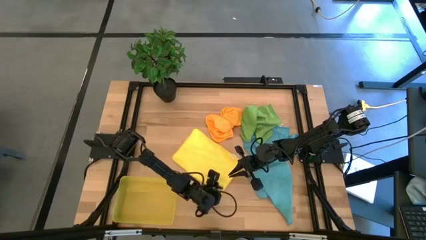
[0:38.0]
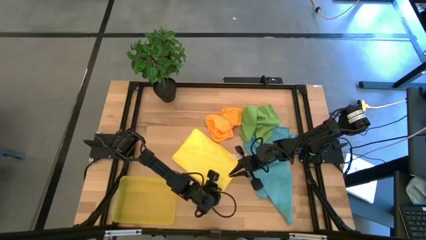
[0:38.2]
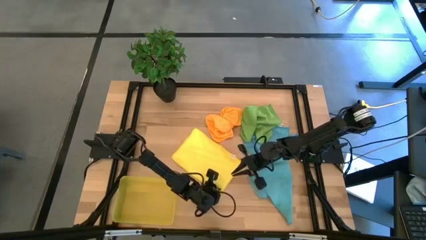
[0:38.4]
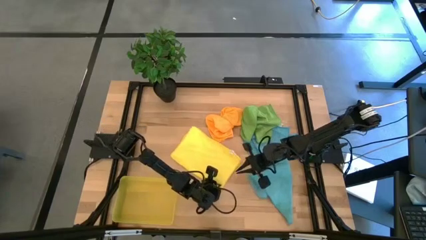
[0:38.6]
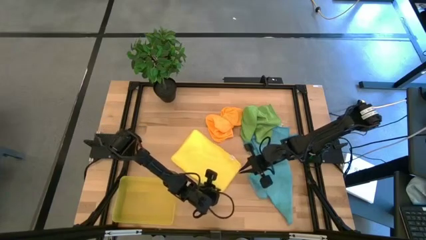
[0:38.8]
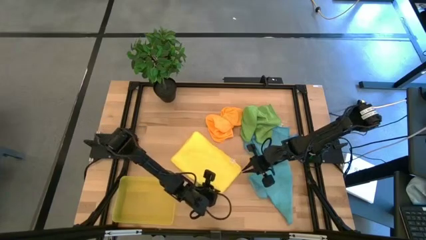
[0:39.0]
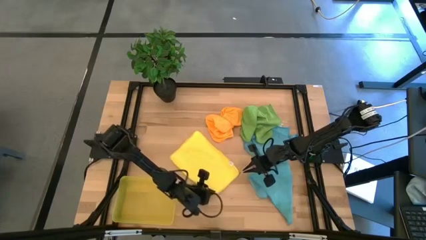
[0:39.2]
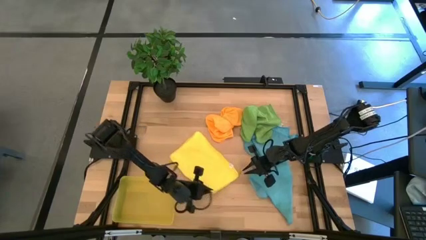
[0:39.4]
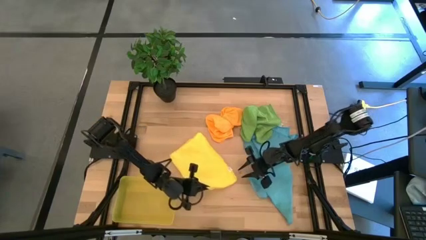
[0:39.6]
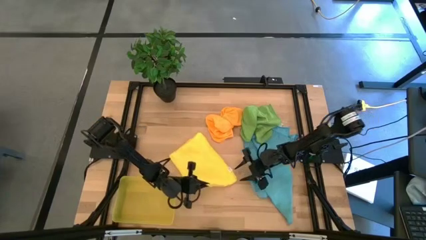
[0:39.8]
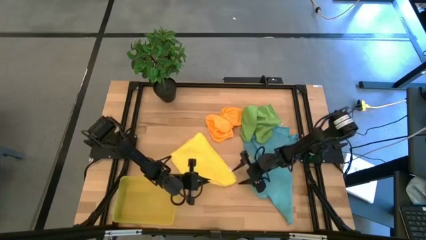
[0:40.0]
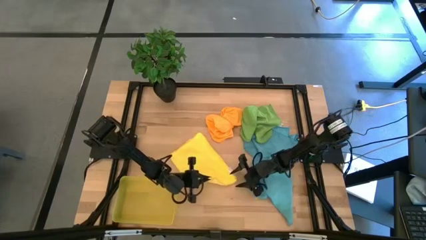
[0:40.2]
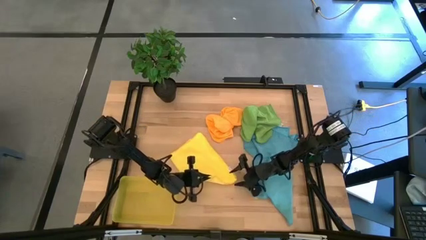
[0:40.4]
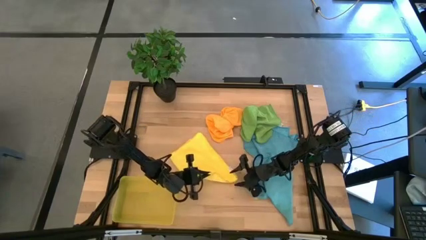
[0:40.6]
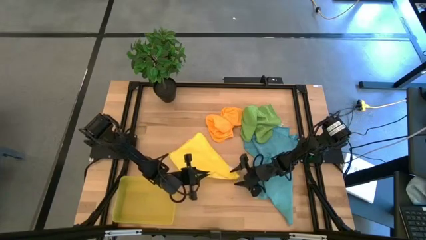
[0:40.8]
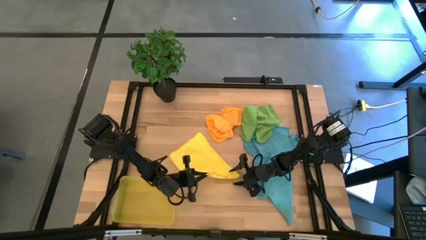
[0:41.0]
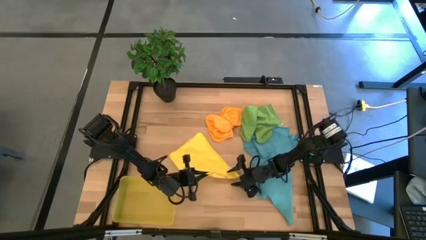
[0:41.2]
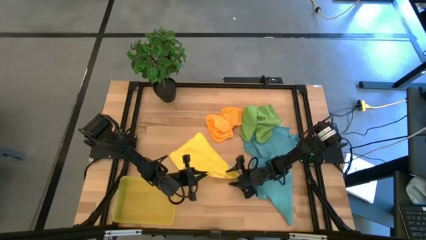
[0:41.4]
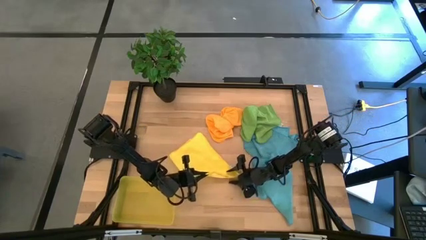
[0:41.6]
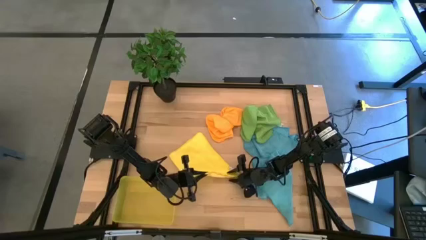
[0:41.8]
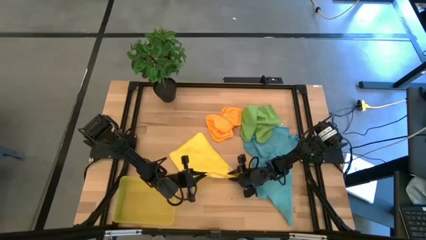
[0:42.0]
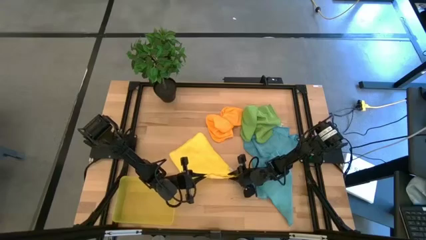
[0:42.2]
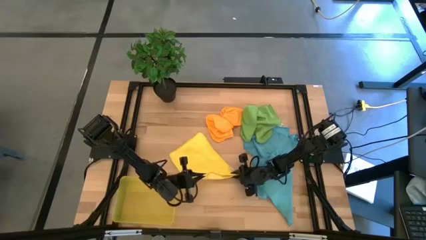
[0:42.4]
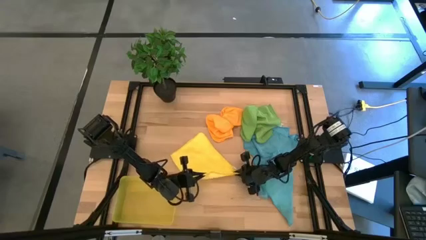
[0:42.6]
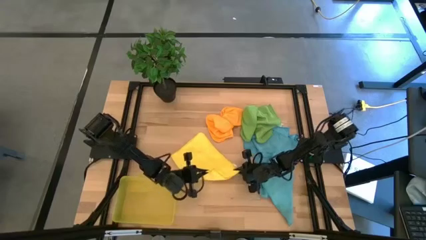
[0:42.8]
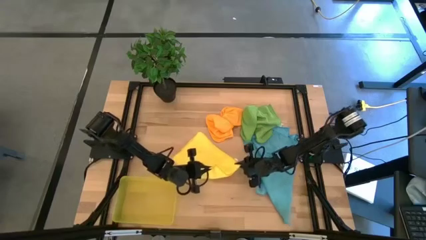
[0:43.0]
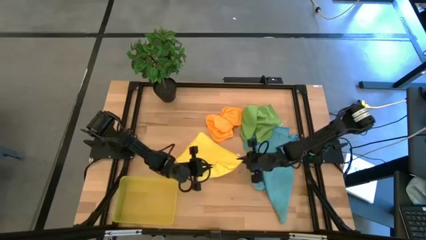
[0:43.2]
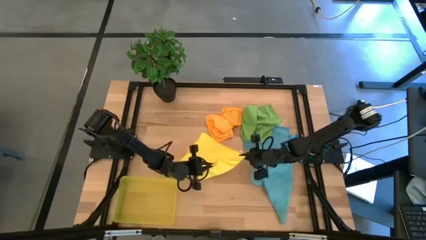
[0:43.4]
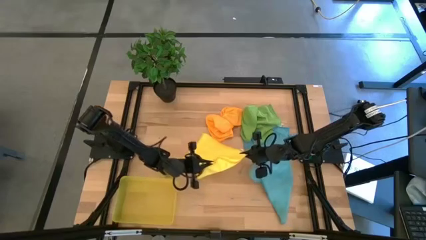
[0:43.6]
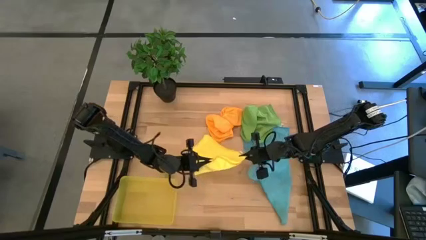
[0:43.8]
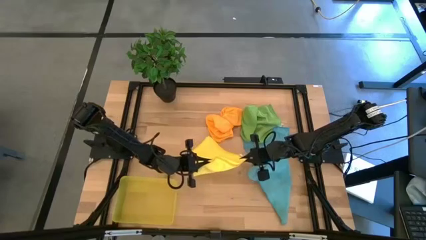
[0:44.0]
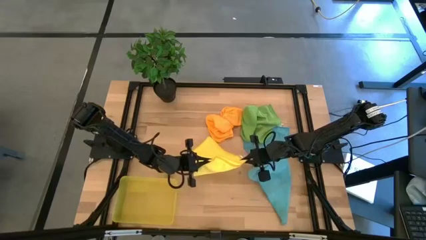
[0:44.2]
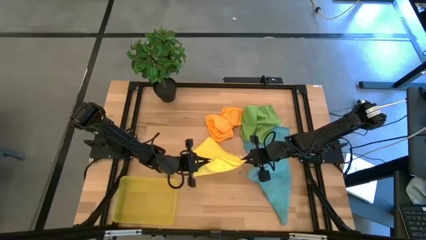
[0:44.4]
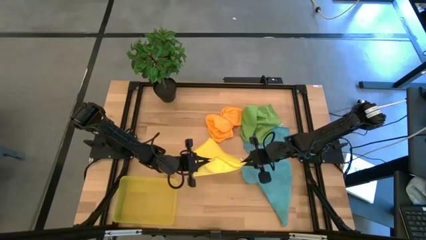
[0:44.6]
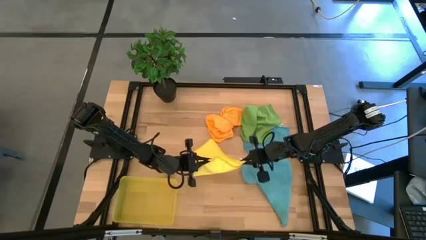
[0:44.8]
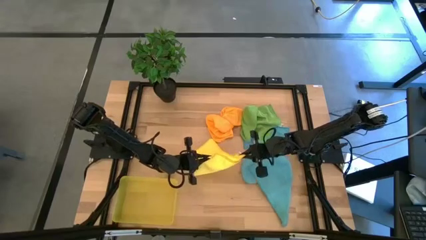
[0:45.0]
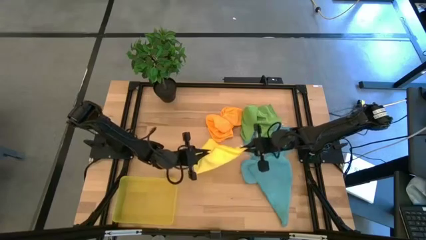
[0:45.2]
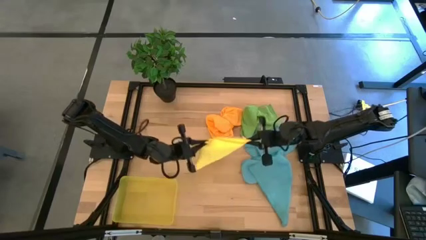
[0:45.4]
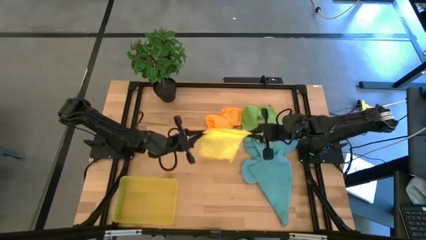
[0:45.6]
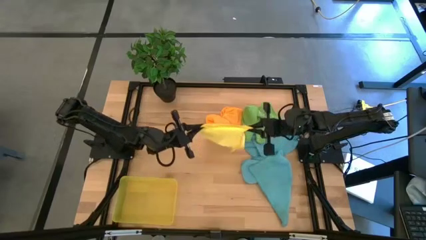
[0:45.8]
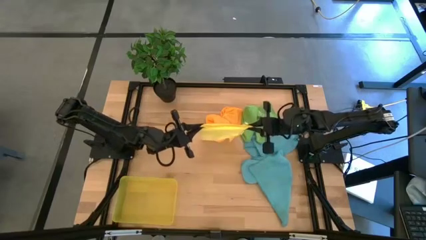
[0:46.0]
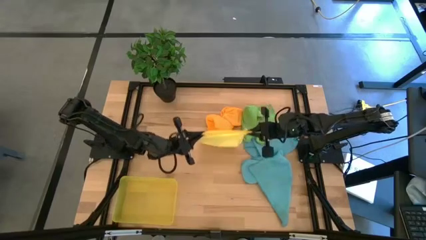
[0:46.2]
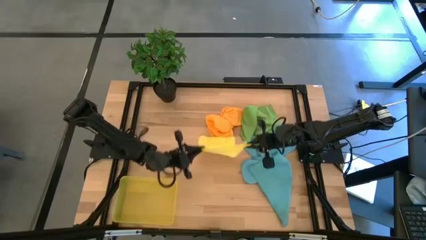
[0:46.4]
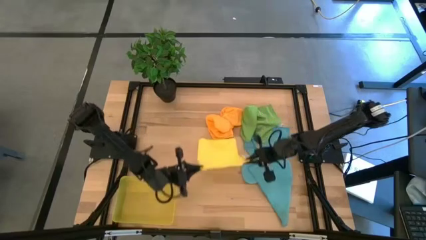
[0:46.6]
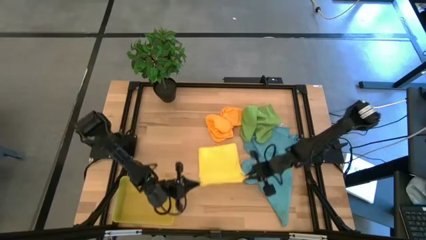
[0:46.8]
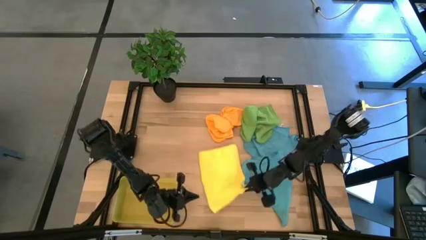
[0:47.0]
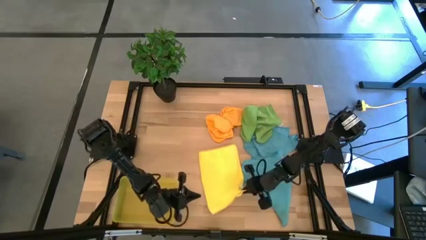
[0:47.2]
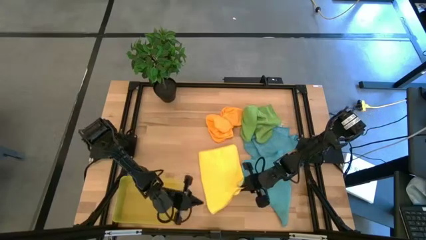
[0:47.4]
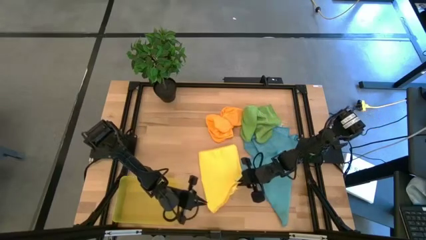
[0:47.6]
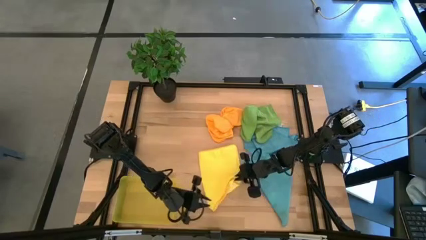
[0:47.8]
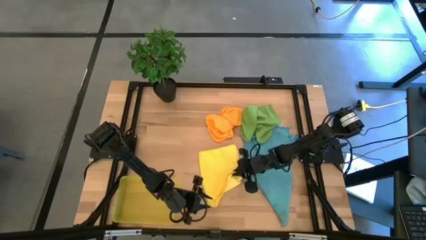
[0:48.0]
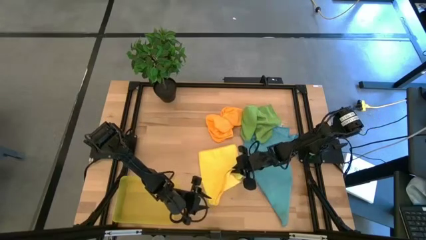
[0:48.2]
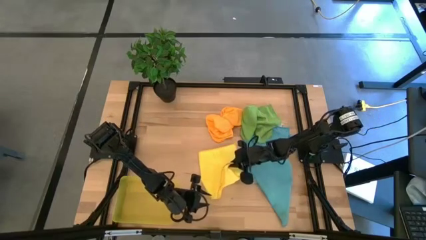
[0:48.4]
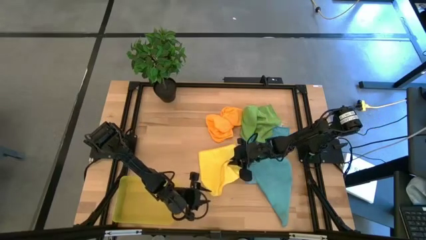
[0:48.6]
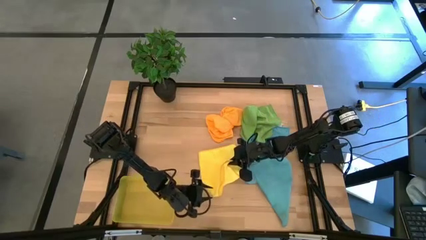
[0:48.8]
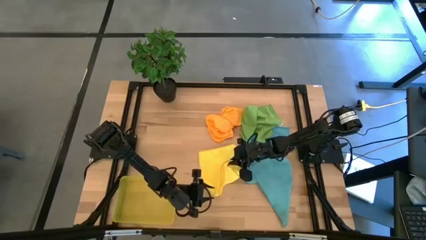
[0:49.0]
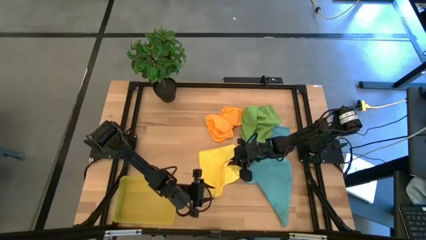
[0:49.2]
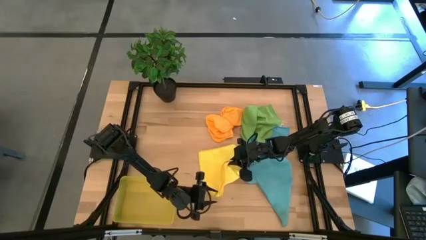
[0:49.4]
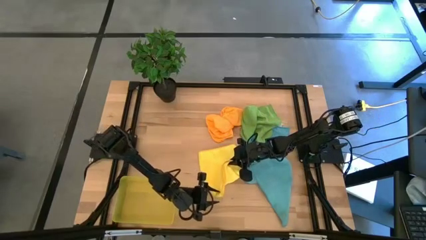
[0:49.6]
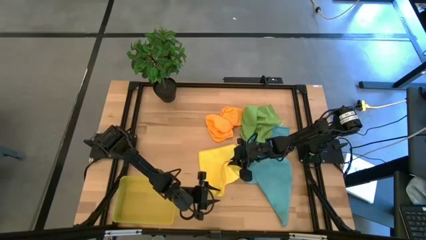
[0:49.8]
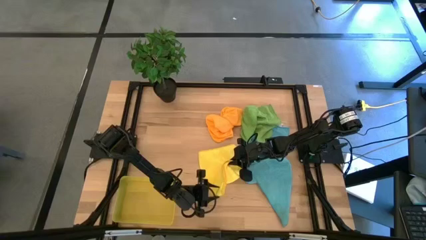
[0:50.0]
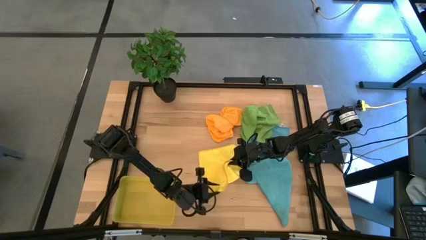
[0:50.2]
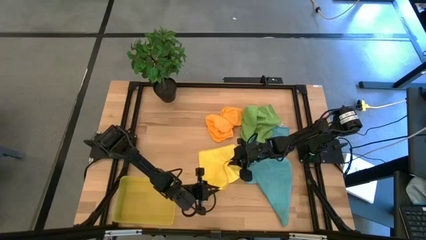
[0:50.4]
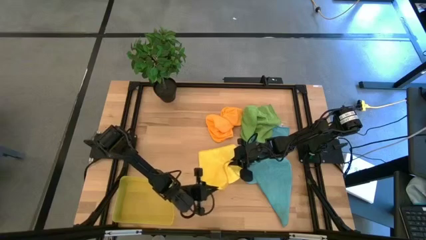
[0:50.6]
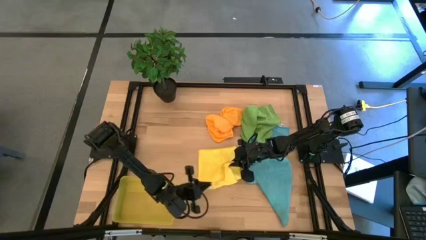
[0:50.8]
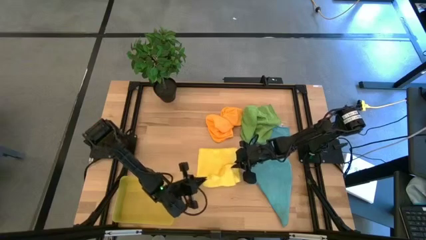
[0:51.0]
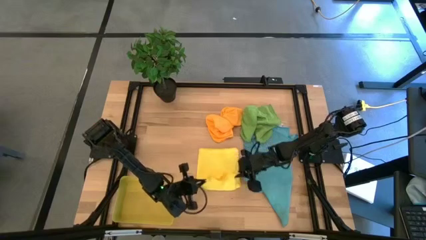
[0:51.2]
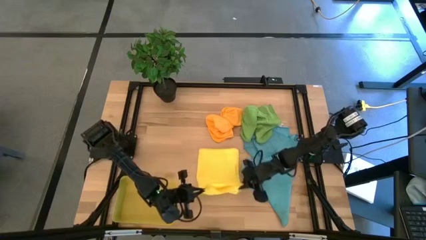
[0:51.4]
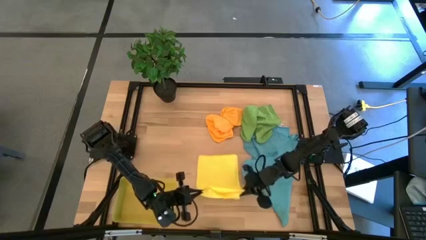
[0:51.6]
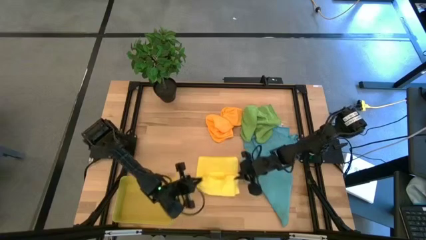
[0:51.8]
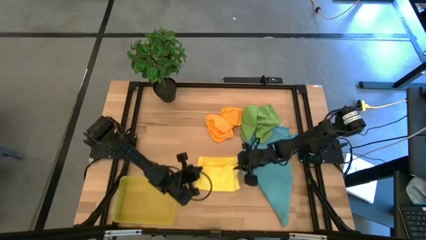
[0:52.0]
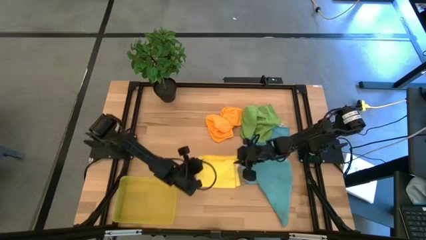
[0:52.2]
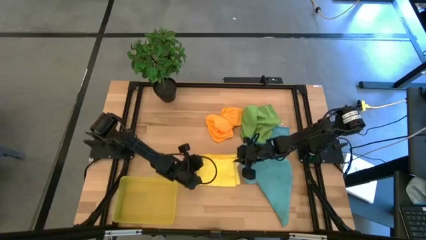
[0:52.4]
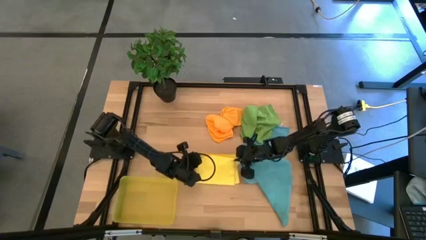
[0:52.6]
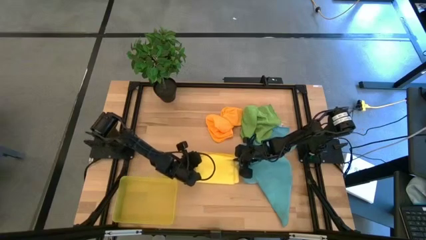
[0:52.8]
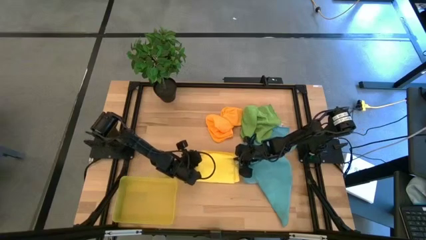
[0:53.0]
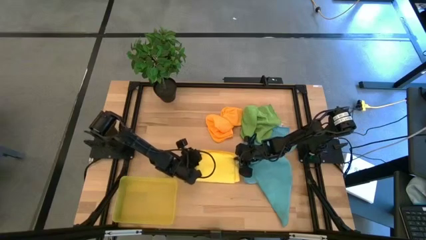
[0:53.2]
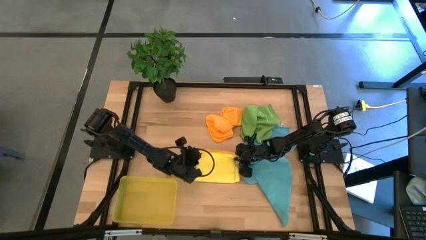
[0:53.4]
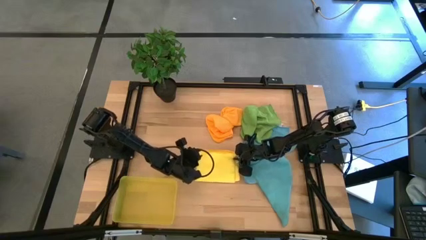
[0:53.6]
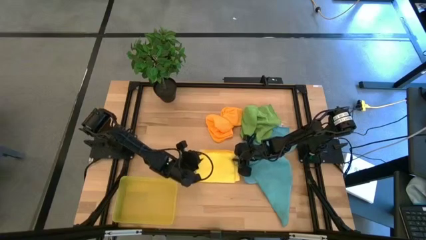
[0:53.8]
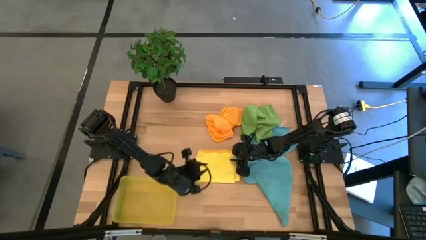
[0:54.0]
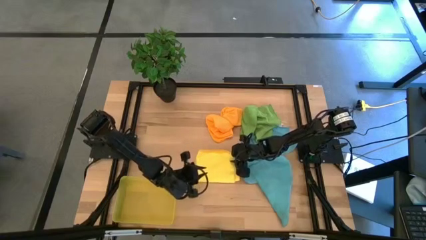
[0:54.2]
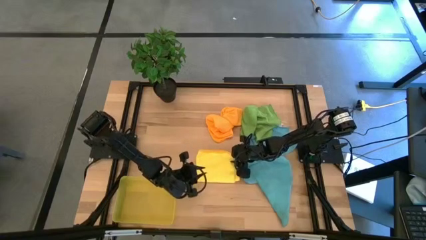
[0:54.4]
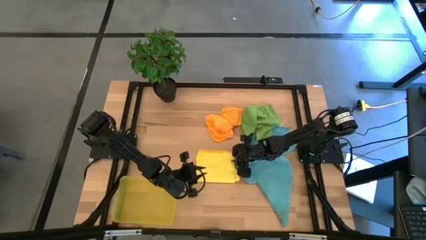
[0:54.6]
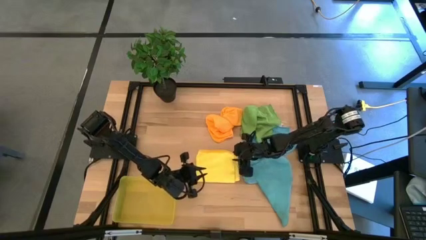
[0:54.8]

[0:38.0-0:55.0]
Task: Fold microfiber towels
Fold the yellow microfiber cloth
